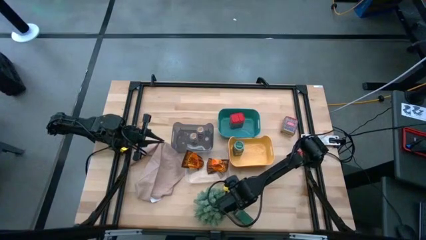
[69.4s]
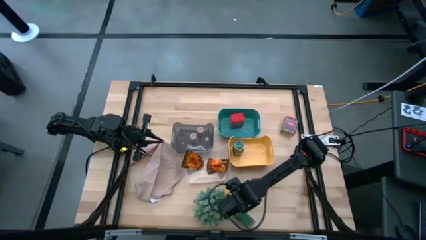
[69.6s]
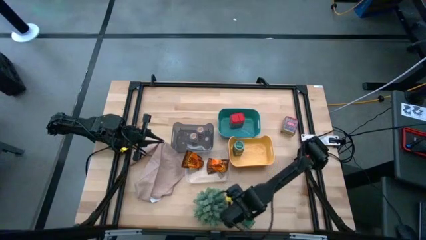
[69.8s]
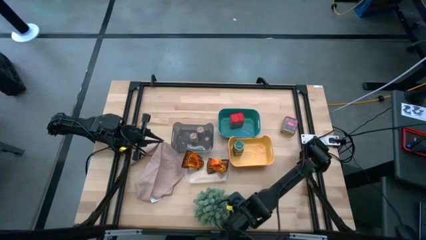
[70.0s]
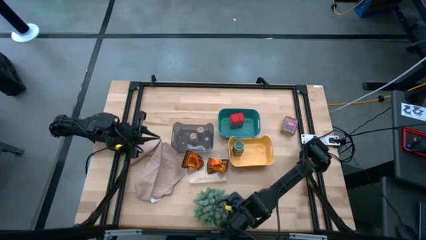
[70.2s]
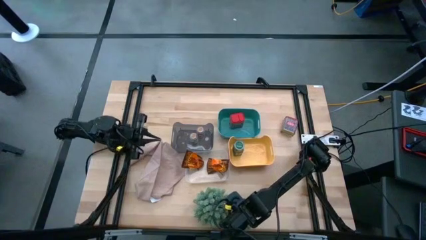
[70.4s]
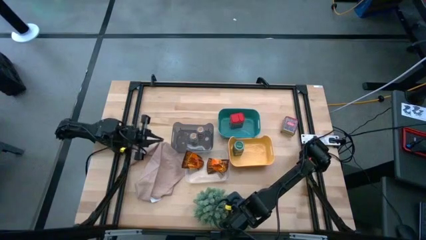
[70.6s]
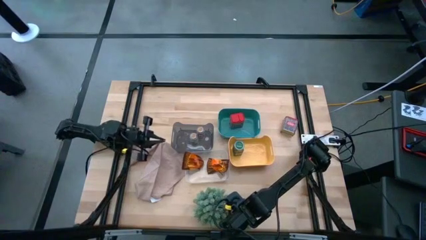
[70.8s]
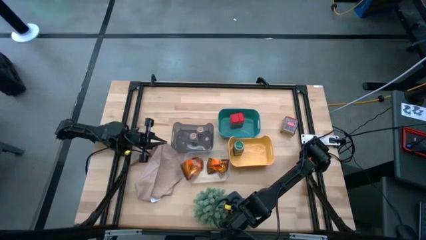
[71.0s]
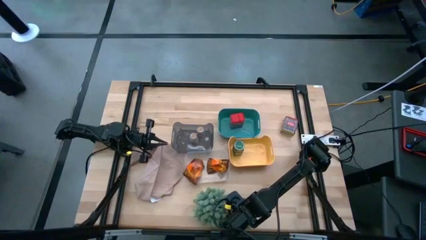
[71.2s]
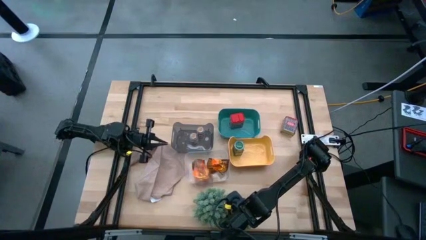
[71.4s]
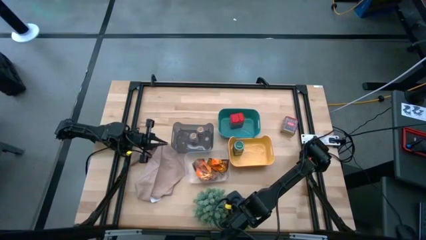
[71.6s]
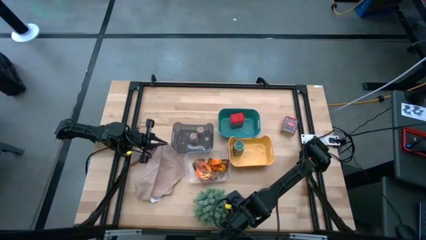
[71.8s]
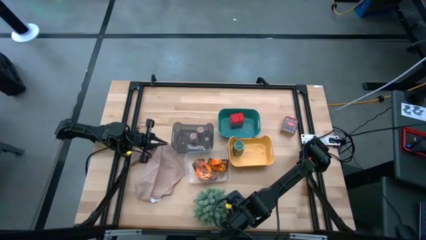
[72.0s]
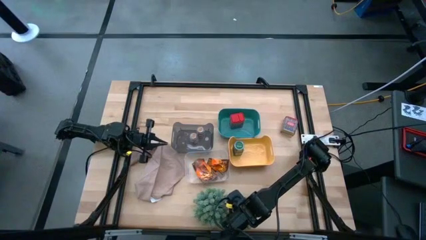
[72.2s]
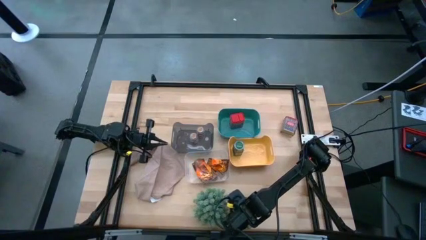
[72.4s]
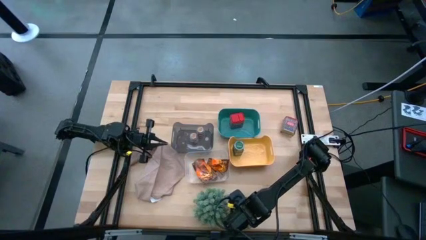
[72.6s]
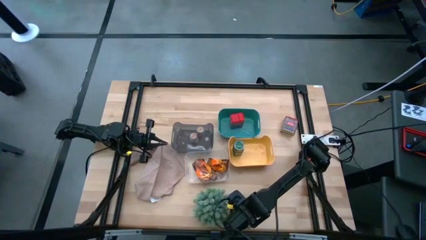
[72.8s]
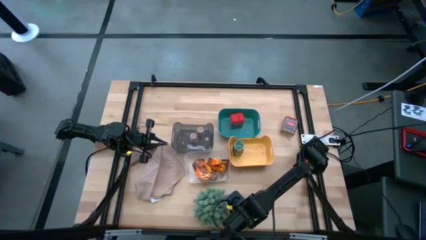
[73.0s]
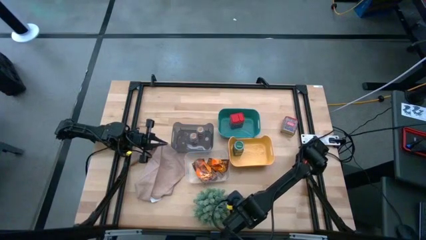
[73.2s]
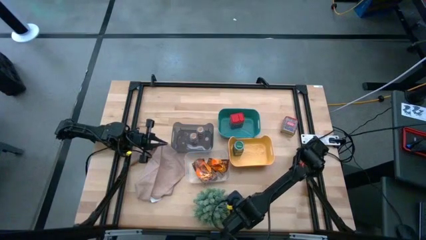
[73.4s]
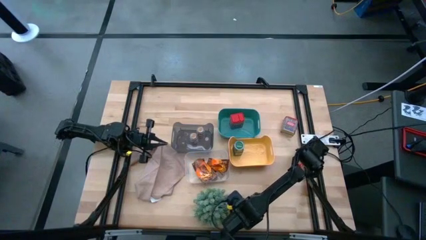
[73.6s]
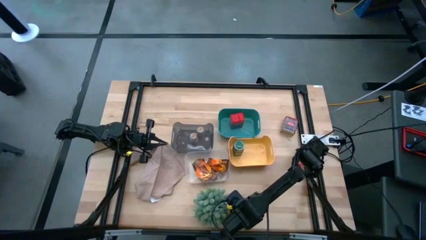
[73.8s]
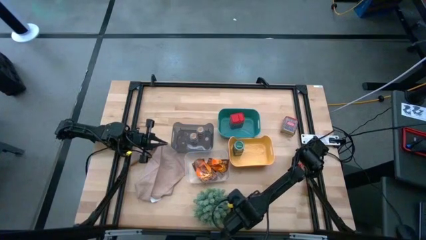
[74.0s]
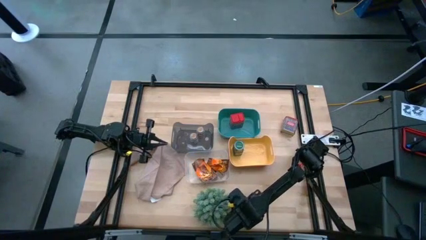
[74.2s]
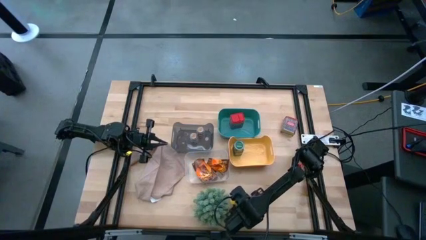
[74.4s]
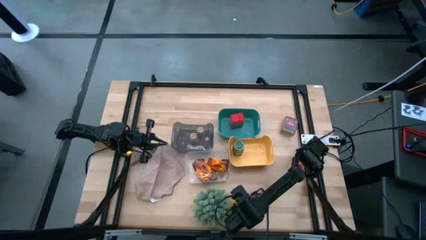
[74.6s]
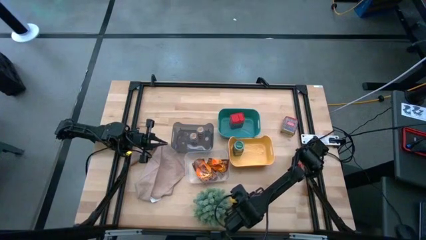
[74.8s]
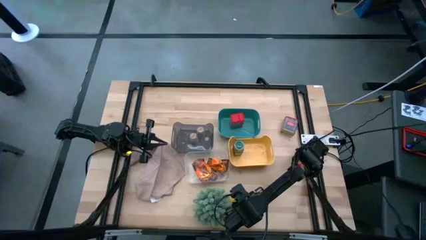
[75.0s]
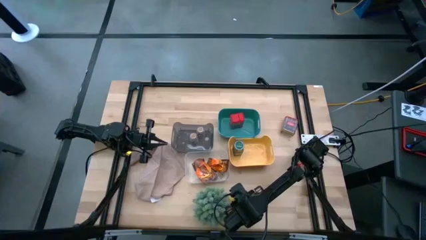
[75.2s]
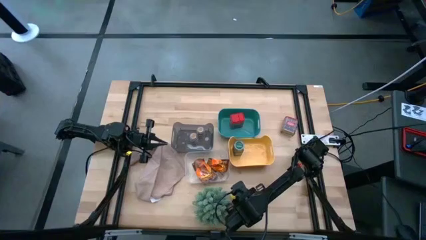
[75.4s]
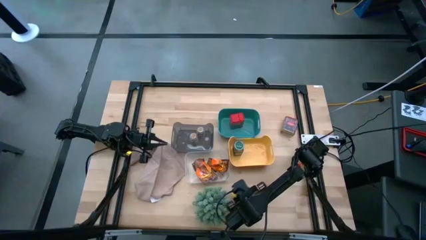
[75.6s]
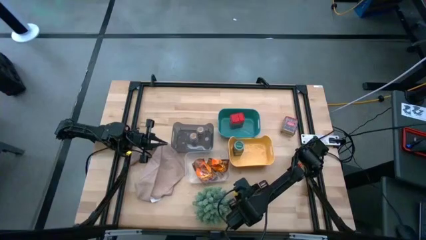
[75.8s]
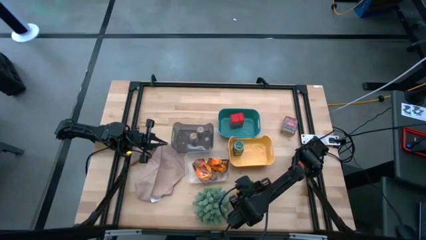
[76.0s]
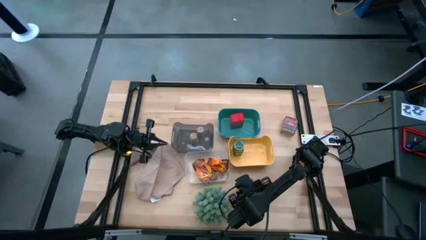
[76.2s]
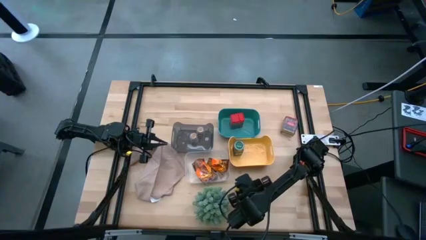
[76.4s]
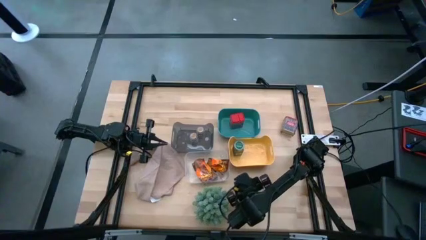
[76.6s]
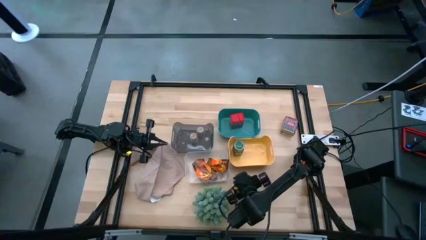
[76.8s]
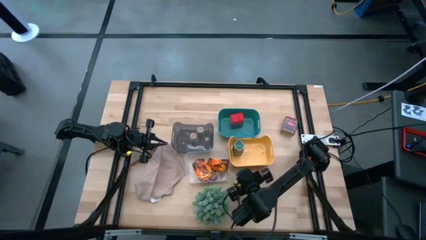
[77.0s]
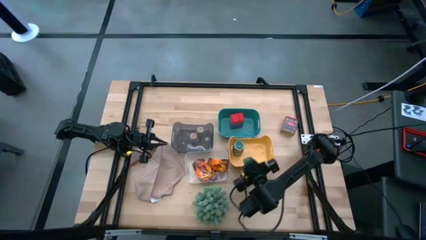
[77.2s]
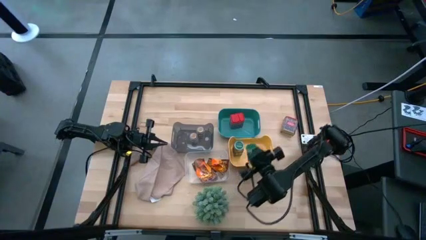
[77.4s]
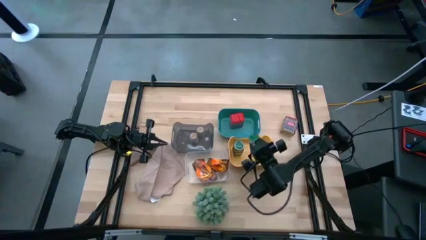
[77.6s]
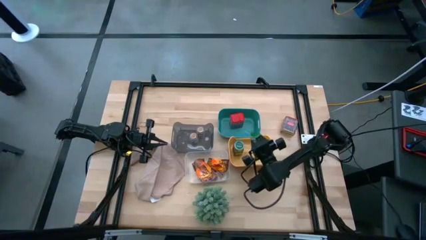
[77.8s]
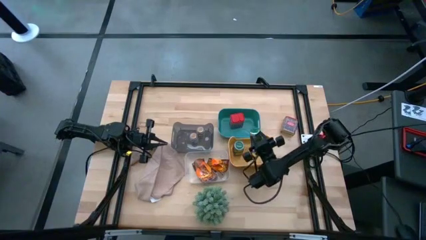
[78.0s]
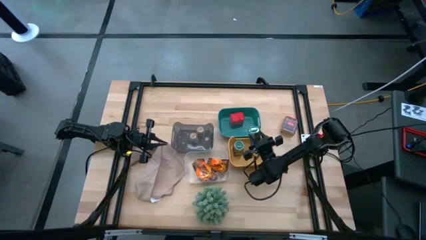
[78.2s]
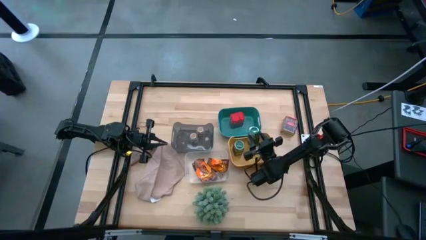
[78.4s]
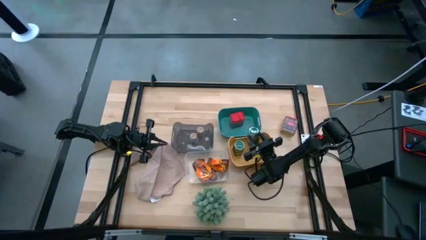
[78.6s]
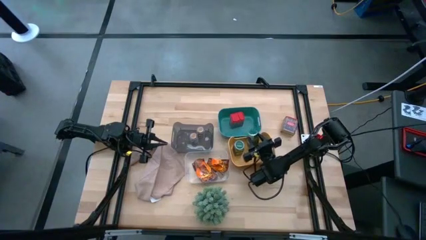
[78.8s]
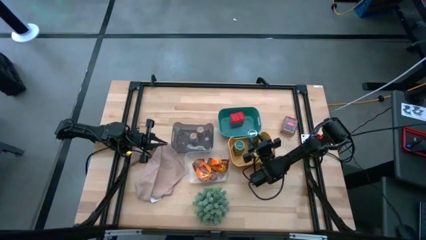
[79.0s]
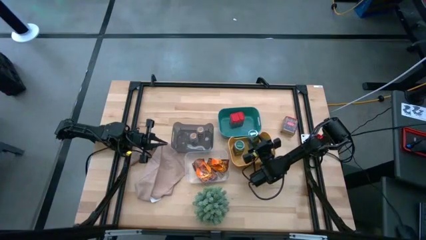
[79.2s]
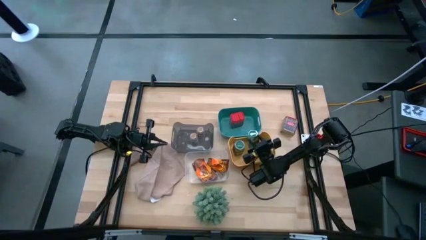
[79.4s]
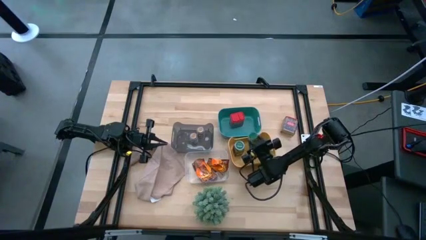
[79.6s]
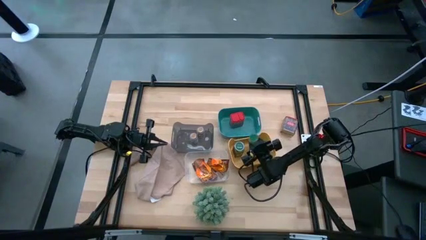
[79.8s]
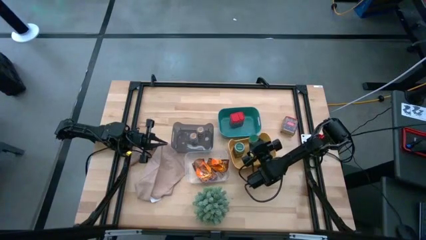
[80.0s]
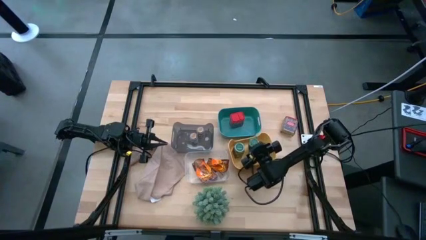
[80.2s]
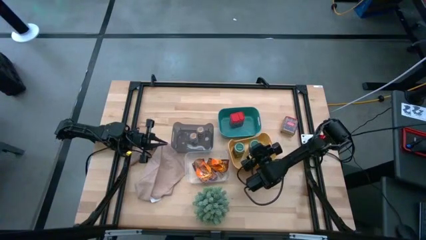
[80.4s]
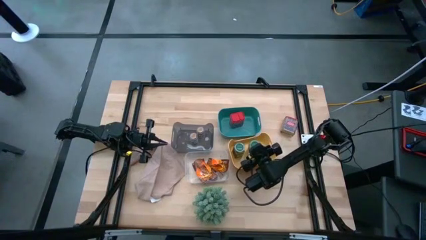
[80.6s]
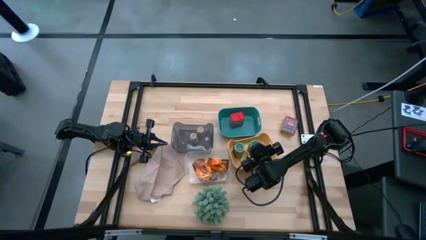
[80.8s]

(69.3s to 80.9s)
Task: Sort spices by type
Put the green seasoning bottle into the yellow bin

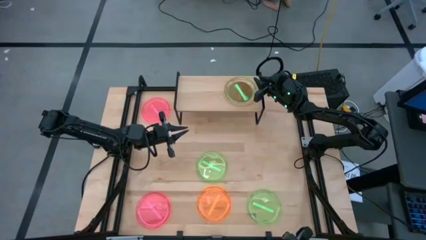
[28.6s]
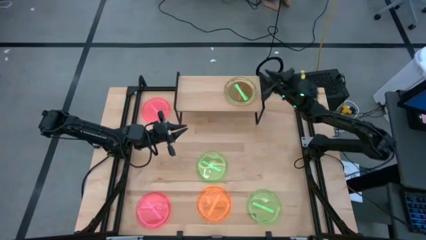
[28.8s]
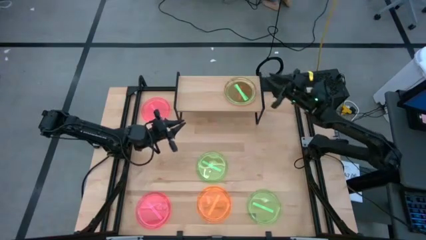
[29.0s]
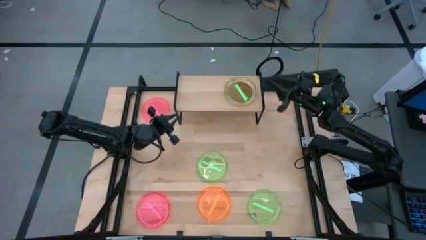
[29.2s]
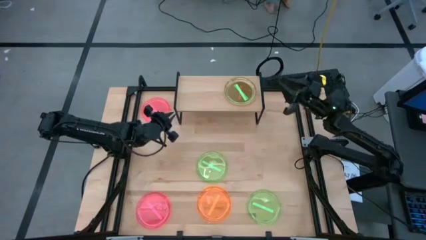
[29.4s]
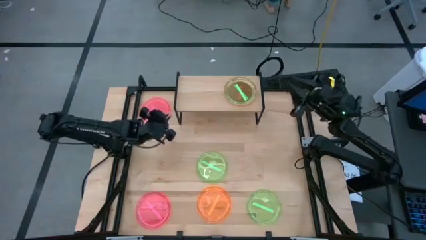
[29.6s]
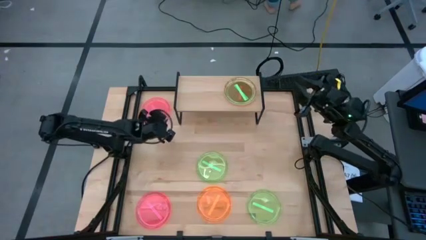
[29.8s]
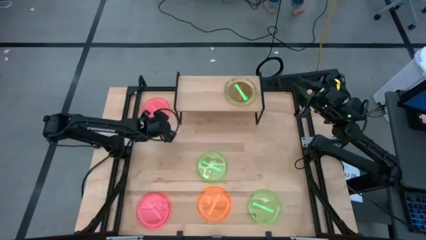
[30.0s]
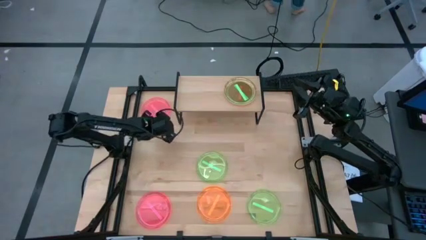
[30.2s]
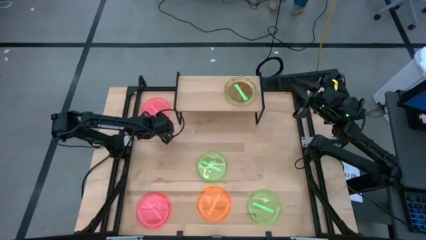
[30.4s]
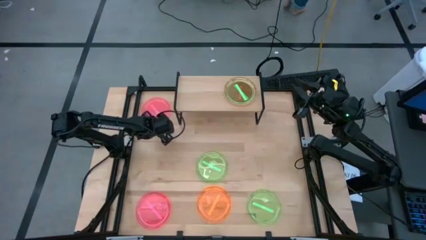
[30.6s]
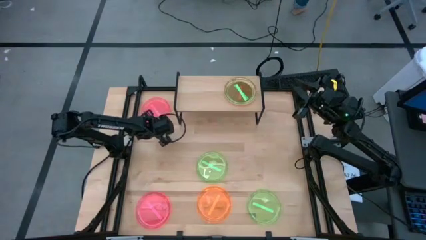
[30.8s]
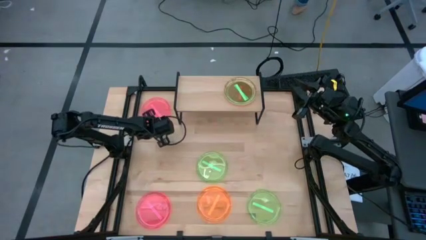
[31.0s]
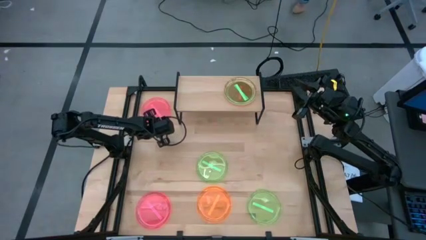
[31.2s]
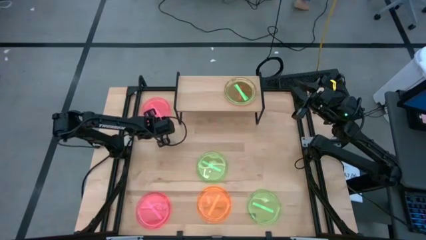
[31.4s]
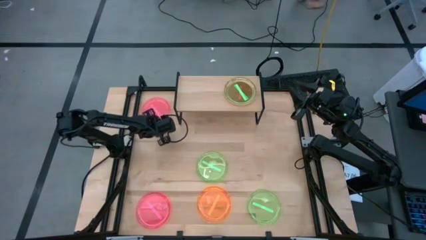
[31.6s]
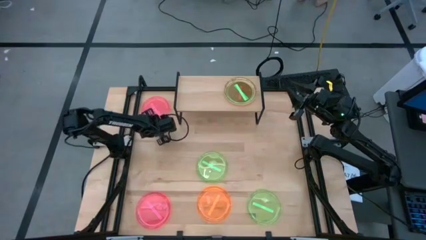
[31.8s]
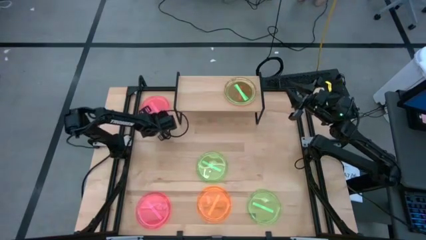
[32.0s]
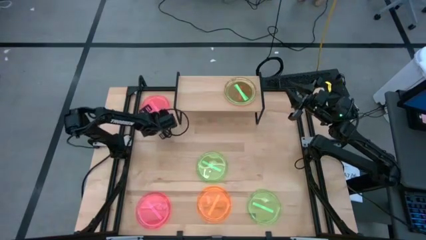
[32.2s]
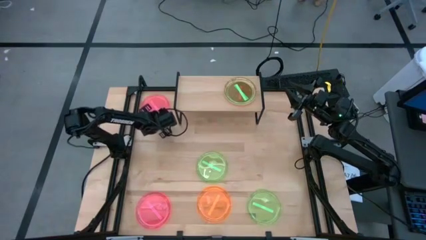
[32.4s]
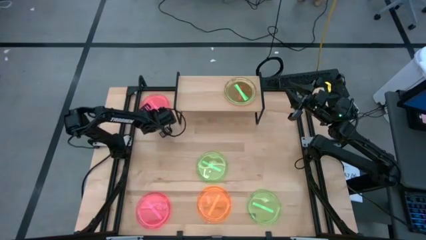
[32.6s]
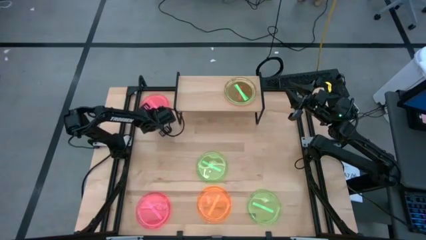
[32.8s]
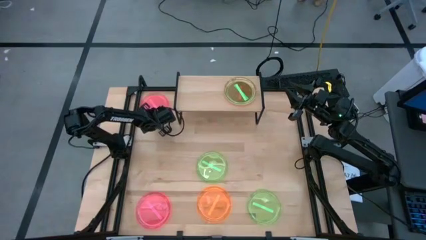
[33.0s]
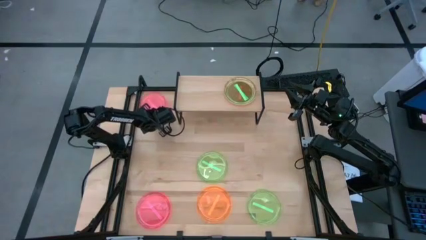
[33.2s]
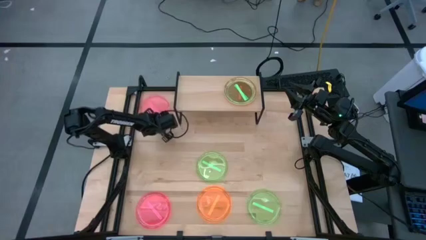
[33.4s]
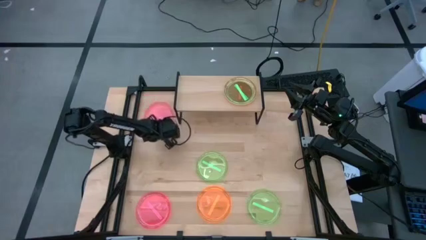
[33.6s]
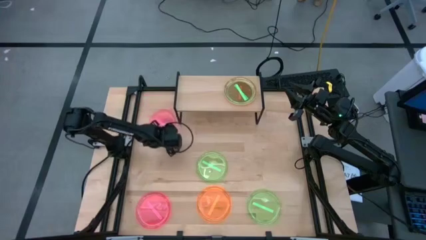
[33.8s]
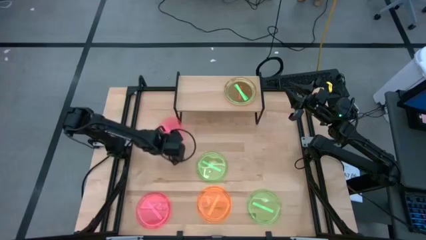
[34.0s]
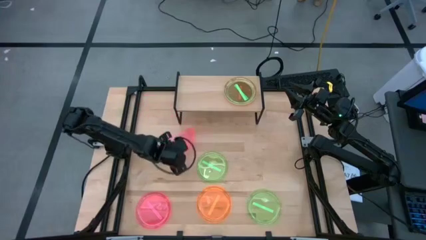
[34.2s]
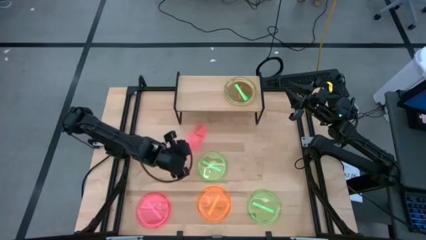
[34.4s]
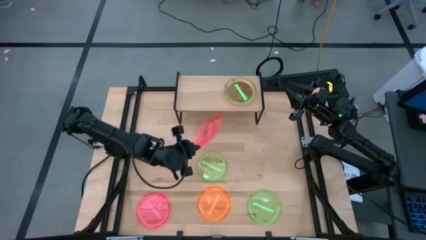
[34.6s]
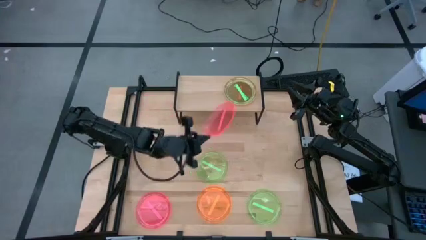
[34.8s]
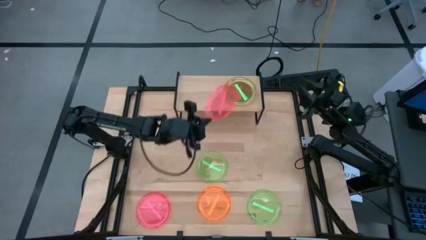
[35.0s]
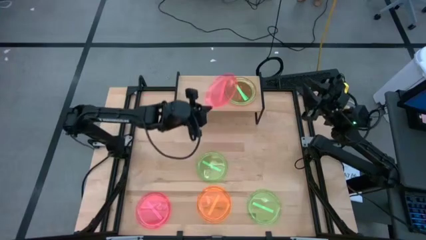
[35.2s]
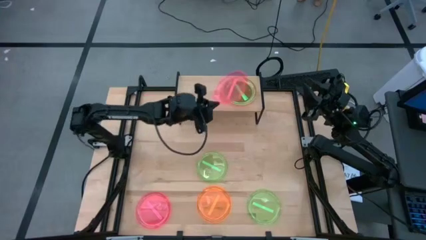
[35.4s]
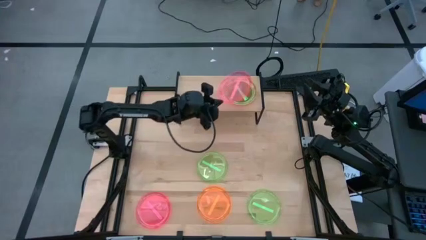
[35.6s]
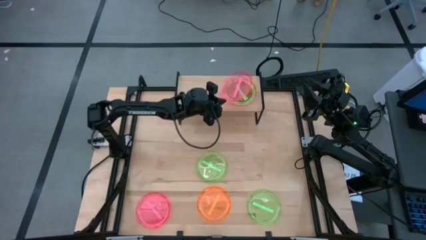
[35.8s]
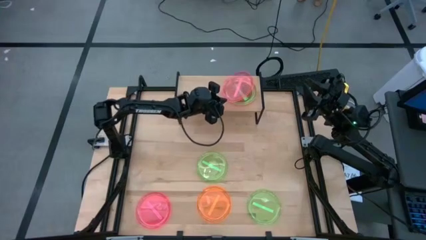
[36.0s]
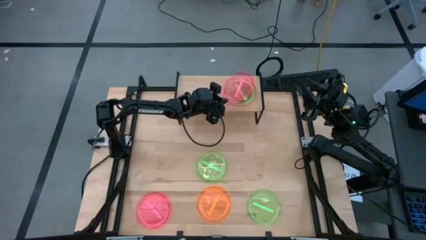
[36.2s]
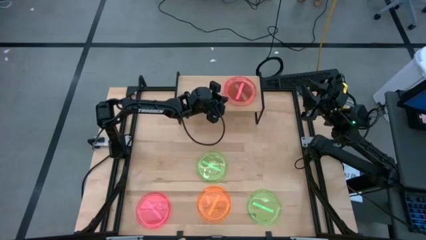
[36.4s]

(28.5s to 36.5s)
Task: Place and stack plates onto a shelf
Stack the top red plate on top of the green plate on the shelf
